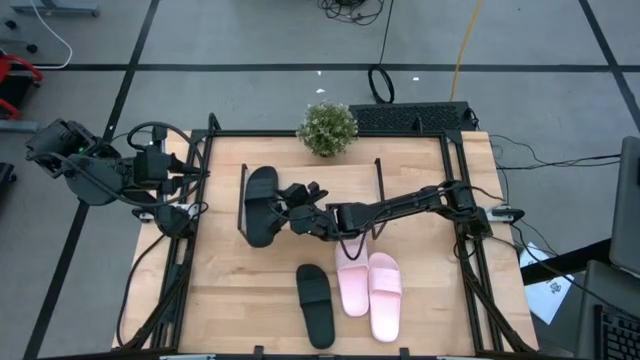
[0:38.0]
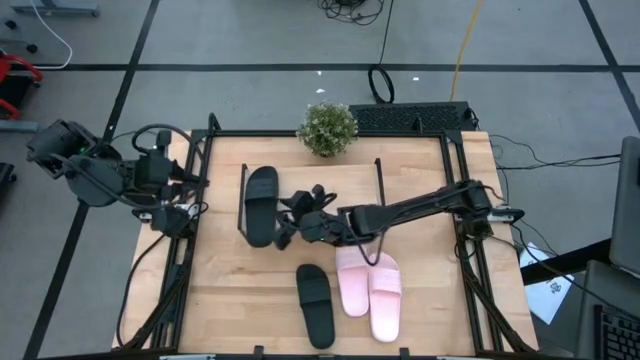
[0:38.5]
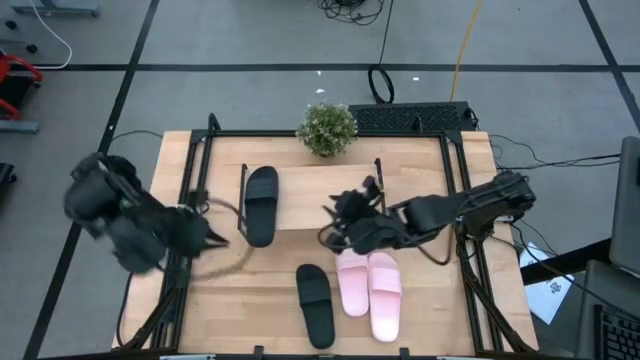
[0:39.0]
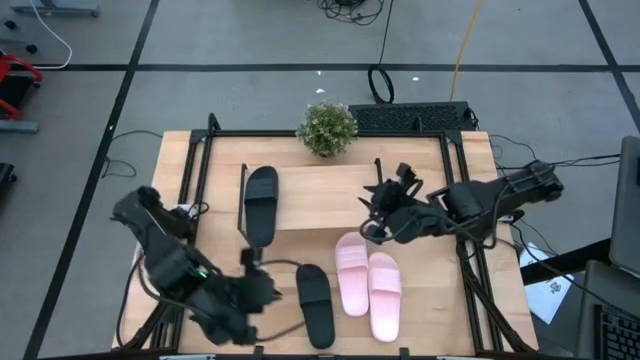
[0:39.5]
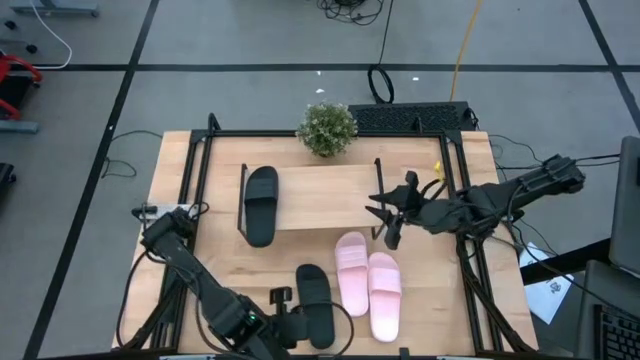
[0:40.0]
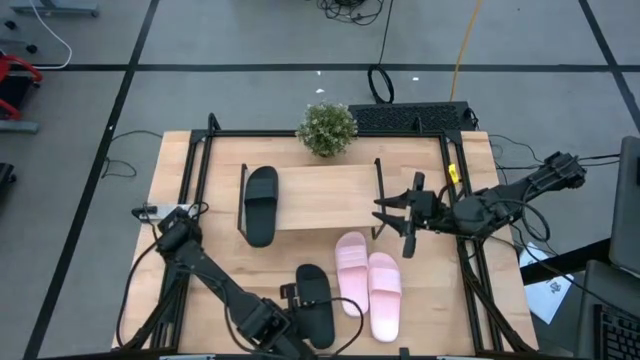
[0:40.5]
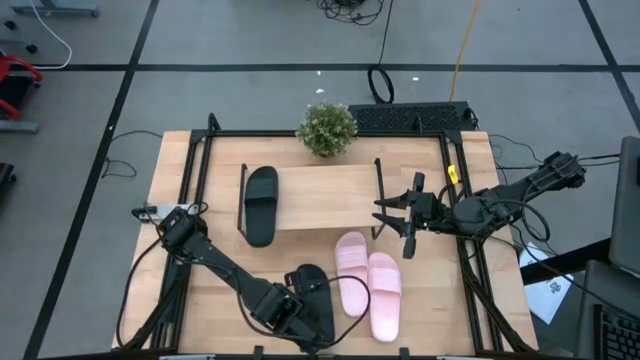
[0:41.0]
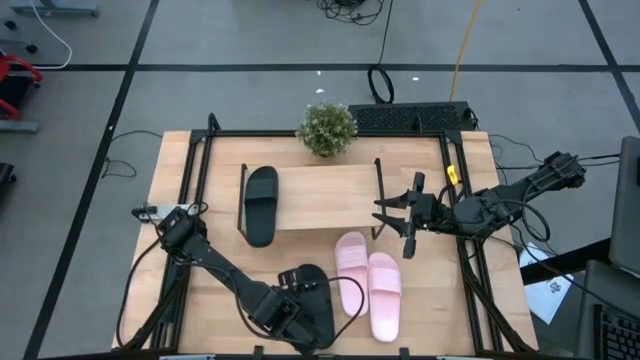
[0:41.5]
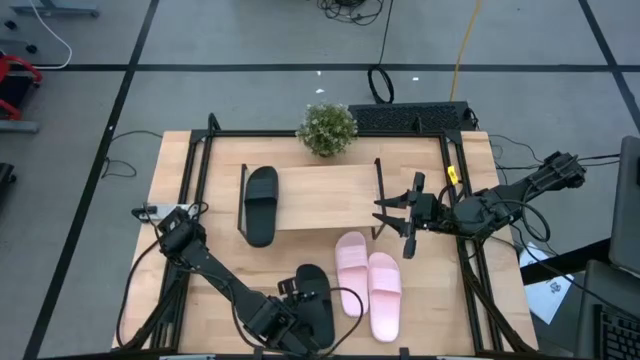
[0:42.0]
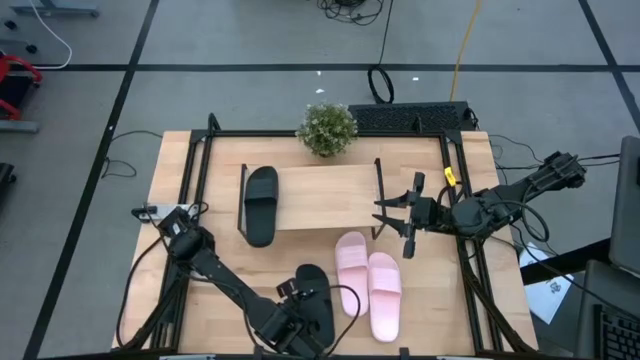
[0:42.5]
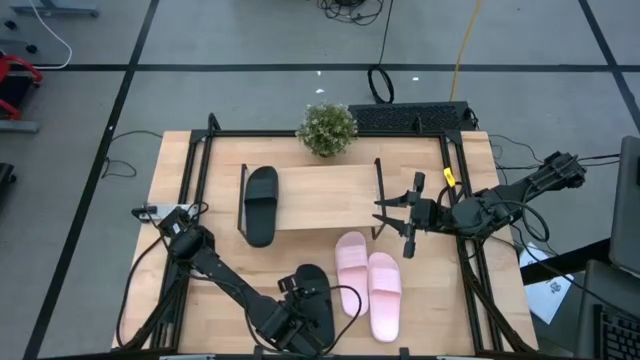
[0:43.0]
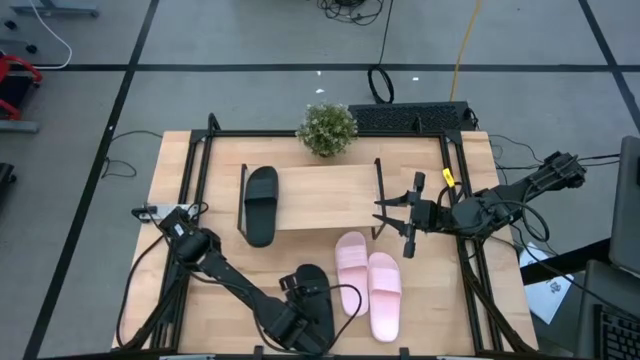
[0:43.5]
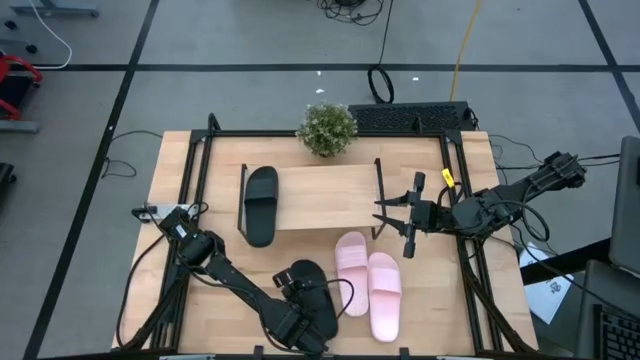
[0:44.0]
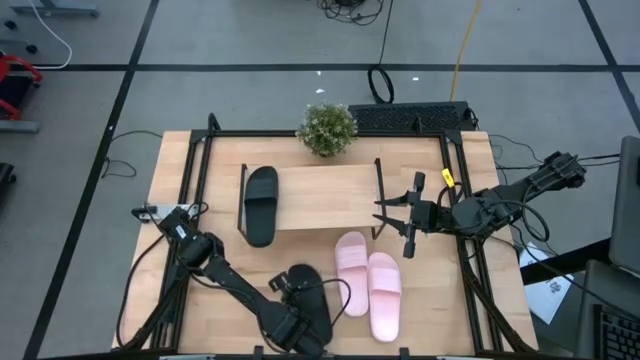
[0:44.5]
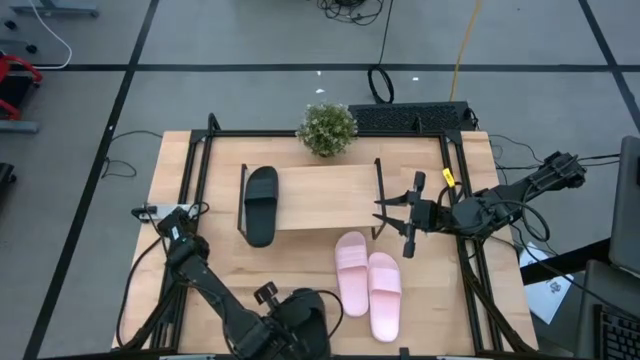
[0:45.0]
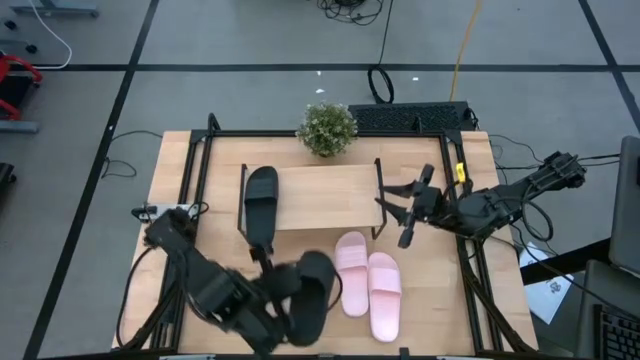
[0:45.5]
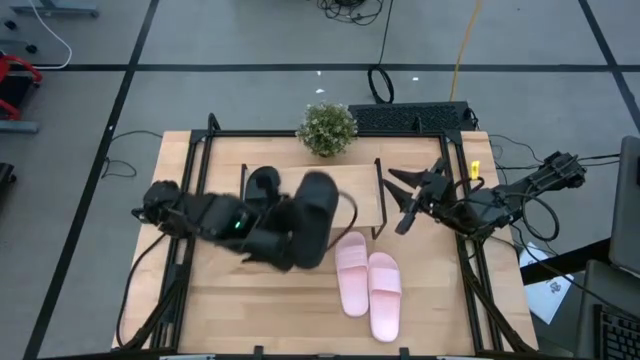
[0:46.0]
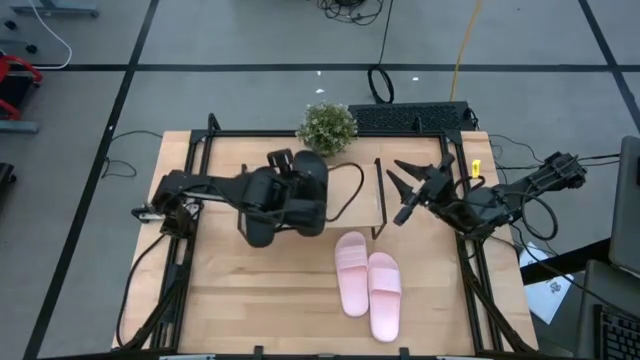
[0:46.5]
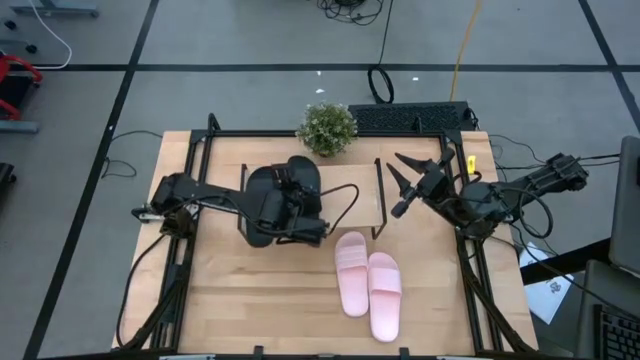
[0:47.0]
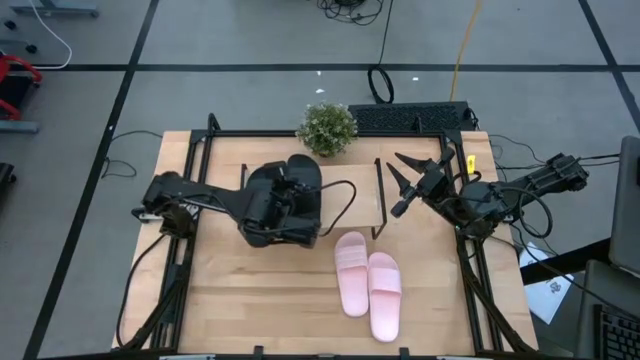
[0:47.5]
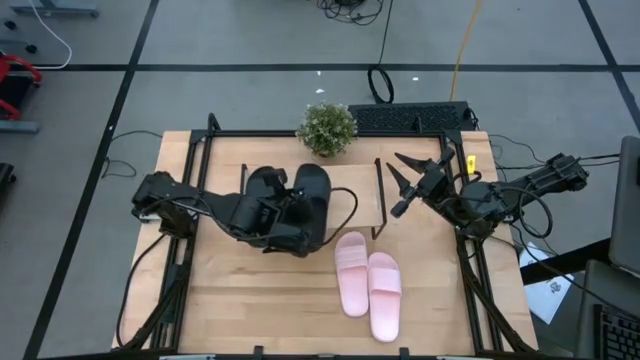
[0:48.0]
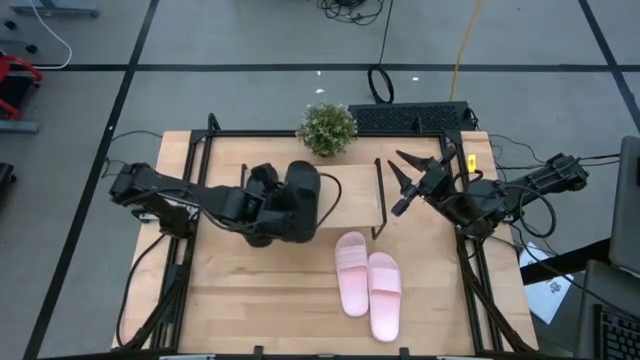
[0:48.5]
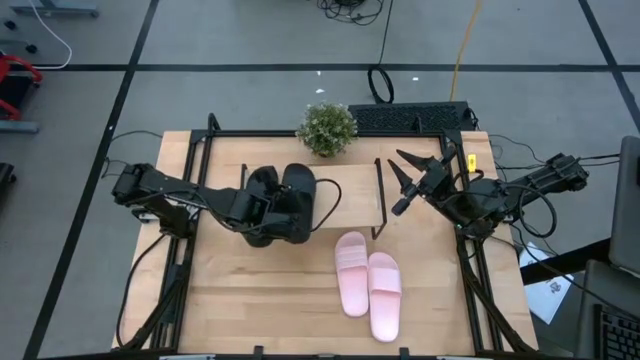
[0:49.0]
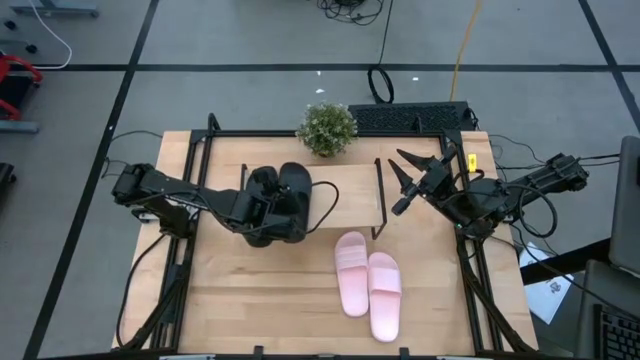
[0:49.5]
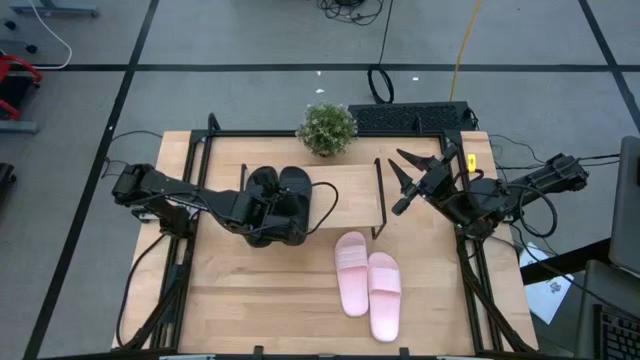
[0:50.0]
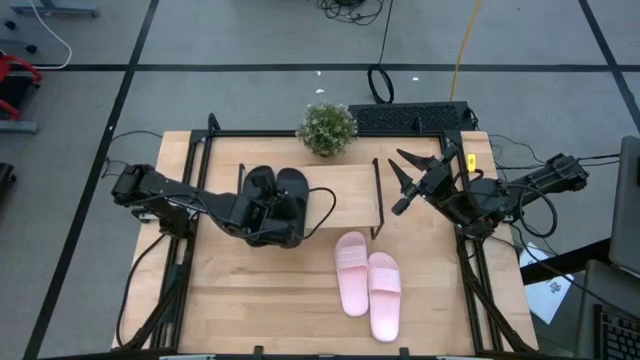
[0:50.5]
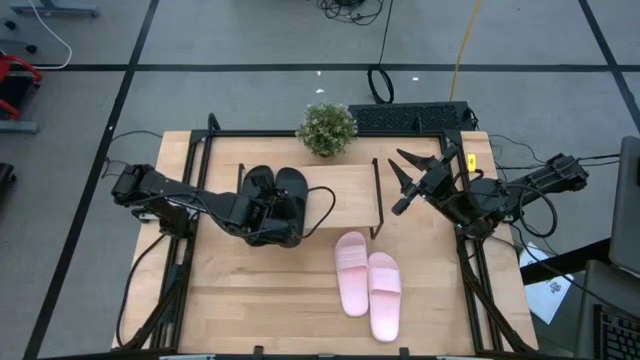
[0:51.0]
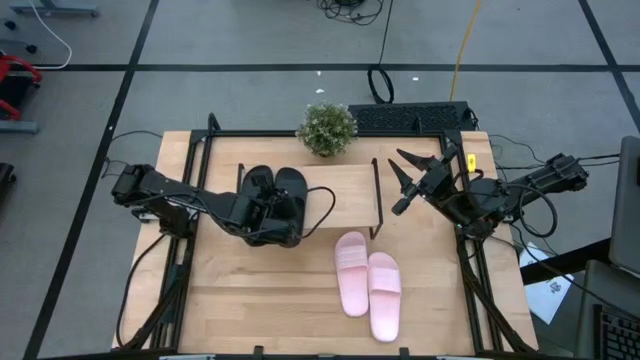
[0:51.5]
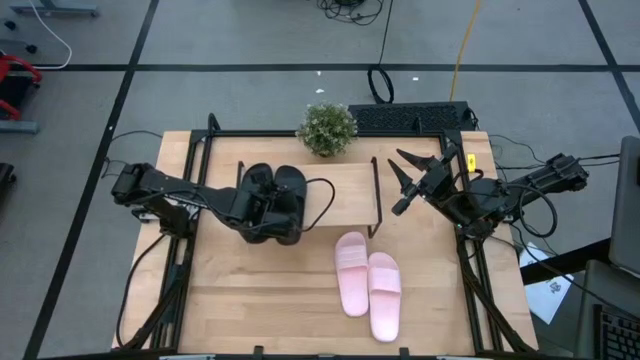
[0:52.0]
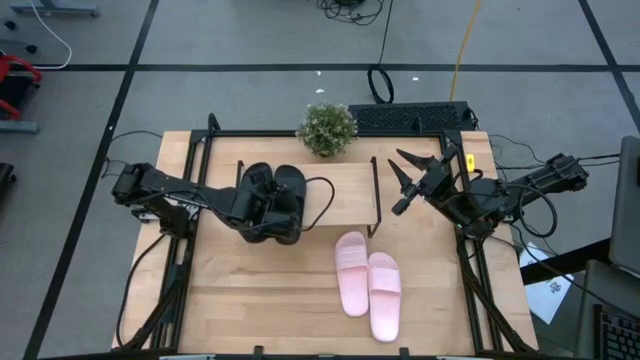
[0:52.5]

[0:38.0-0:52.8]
Task: Pick and place slides into the shelf
Put the black slide on the shelf
